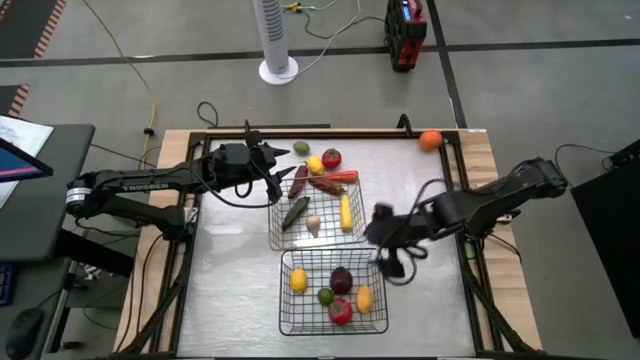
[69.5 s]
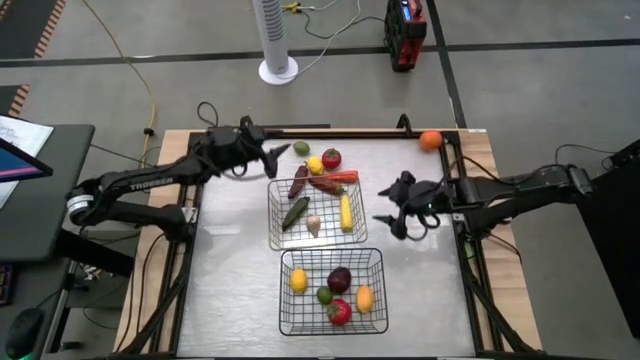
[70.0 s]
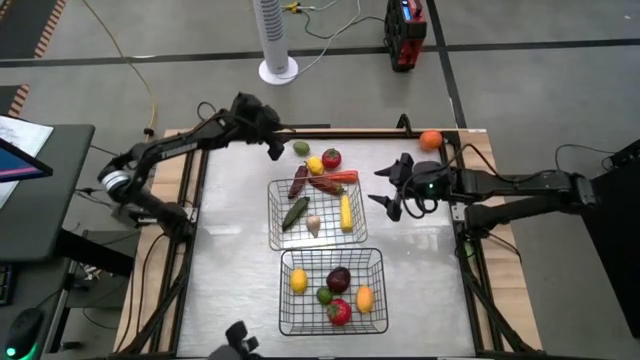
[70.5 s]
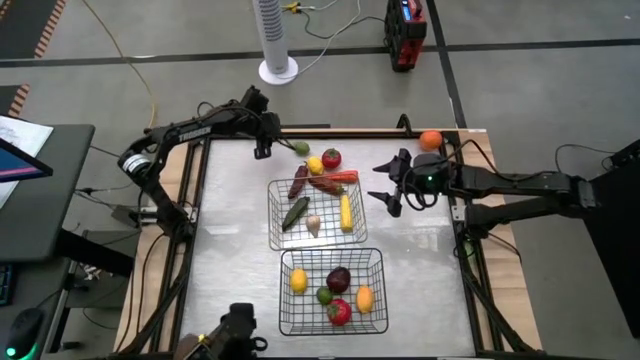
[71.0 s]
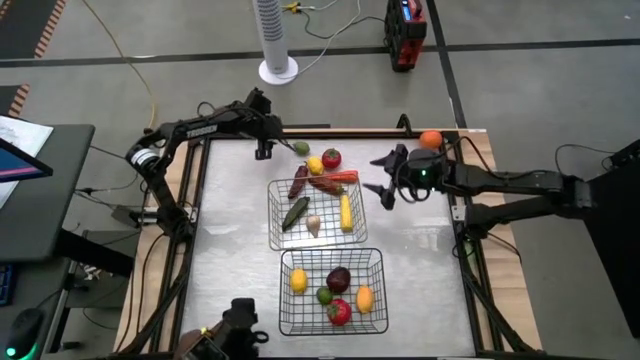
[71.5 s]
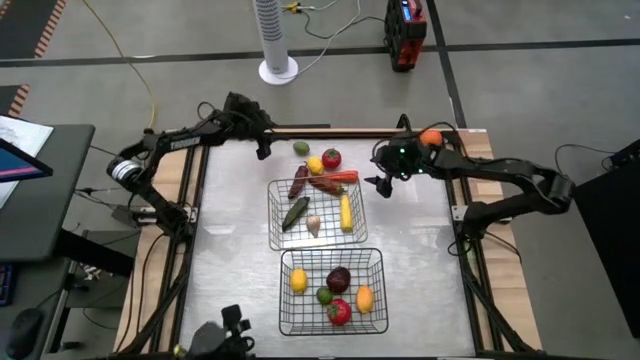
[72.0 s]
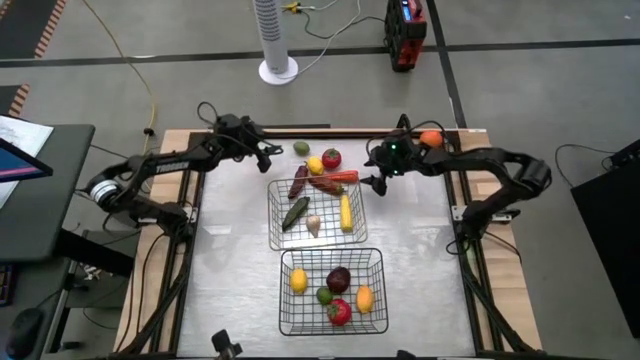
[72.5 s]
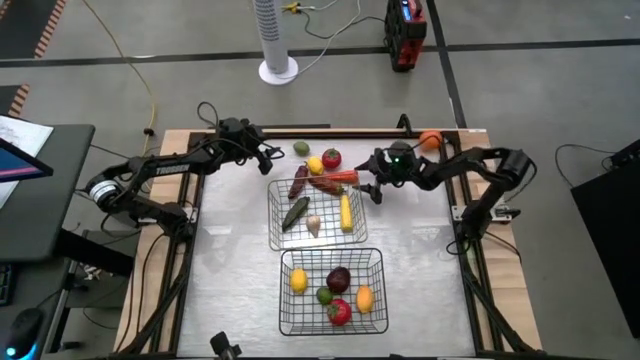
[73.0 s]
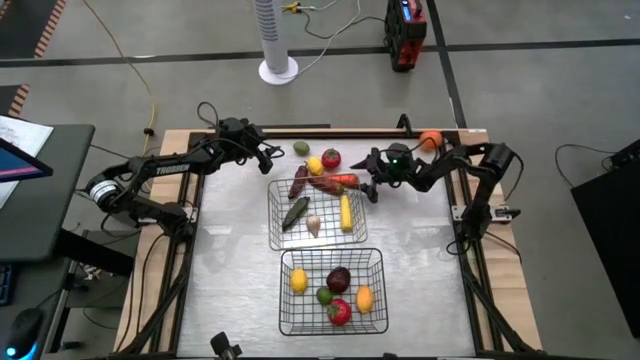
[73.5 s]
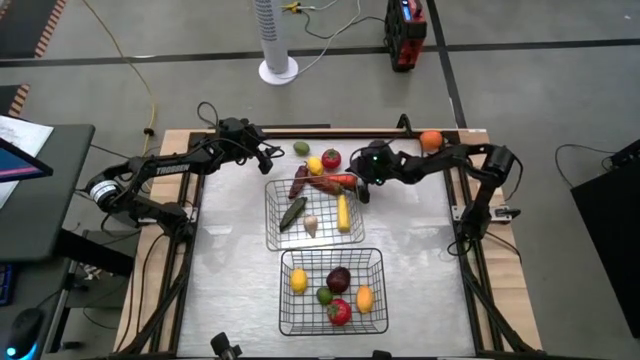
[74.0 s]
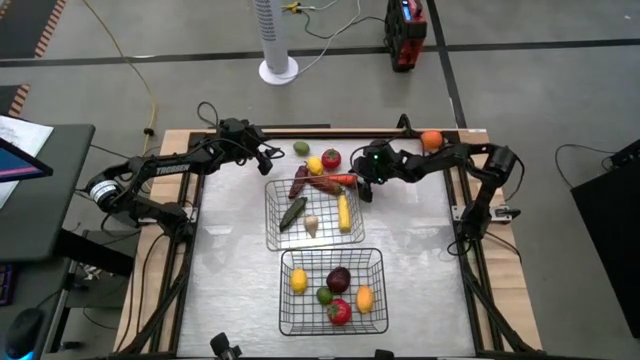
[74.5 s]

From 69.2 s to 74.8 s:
Task: Sort produce into baskets
Put the carrot into the top wire basket

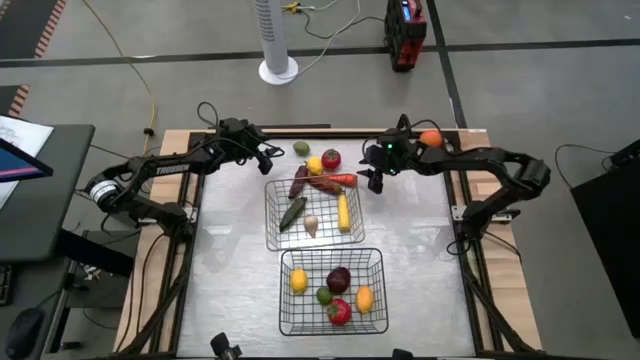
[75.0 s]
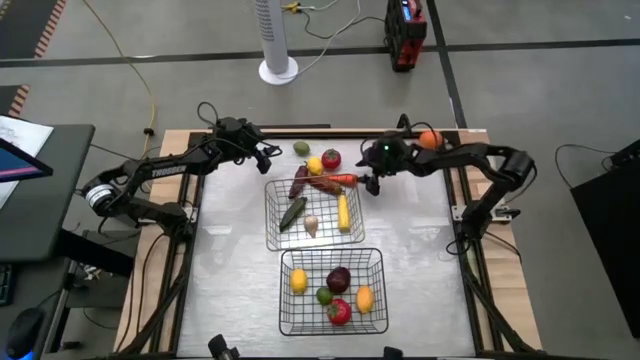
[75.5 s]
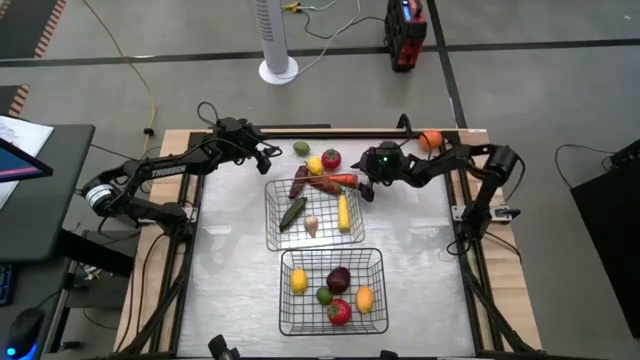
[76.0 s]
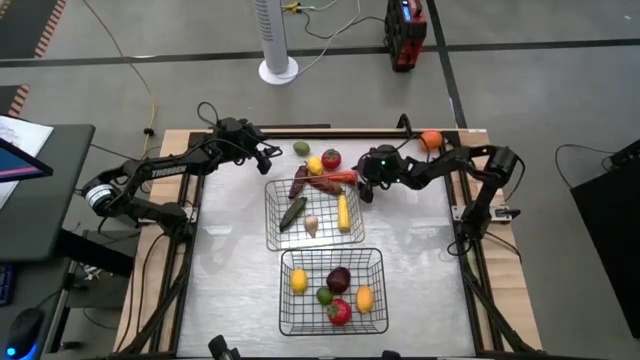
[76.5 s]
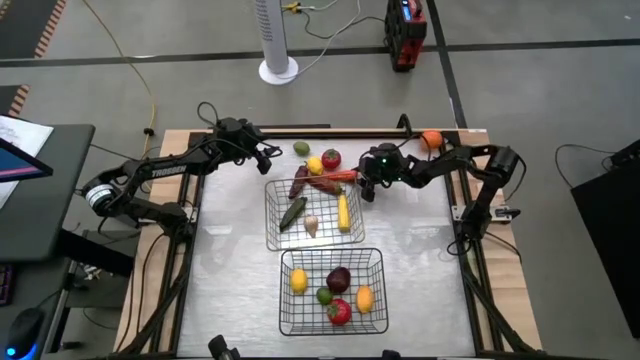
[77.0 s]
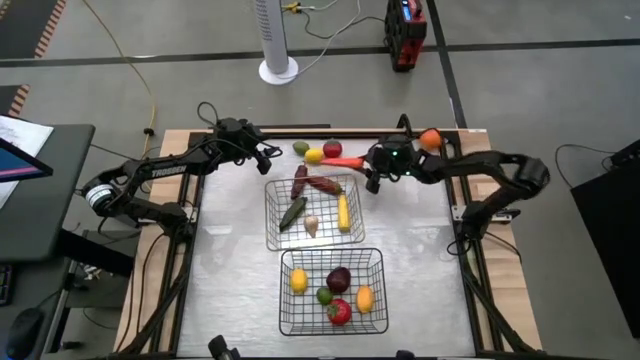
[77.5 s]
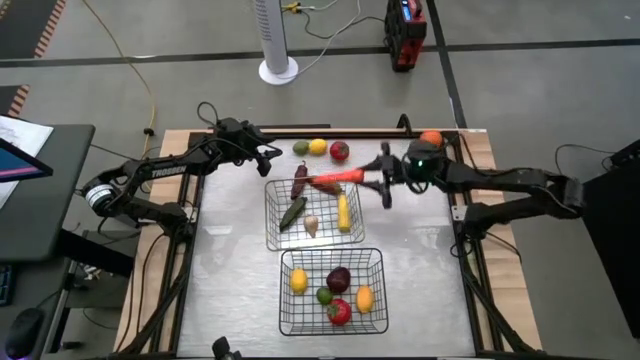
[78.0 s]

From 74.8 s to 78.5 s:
Put the carrot into the top wire basket

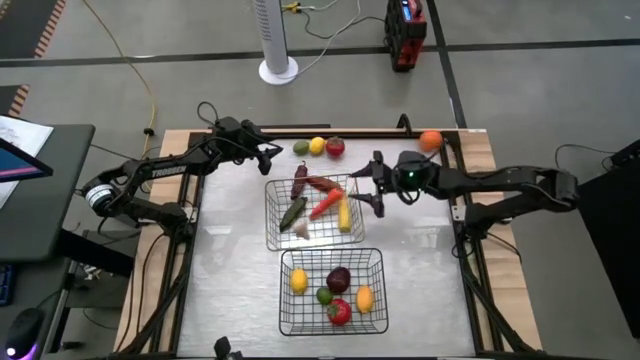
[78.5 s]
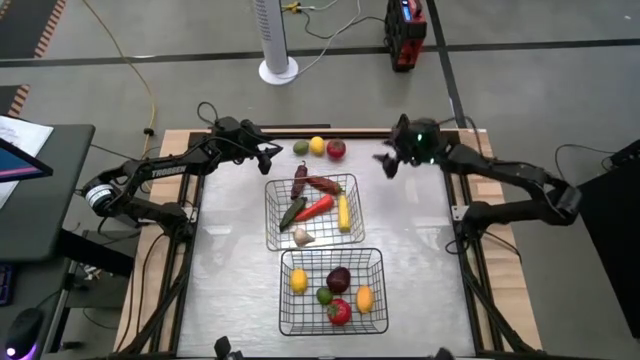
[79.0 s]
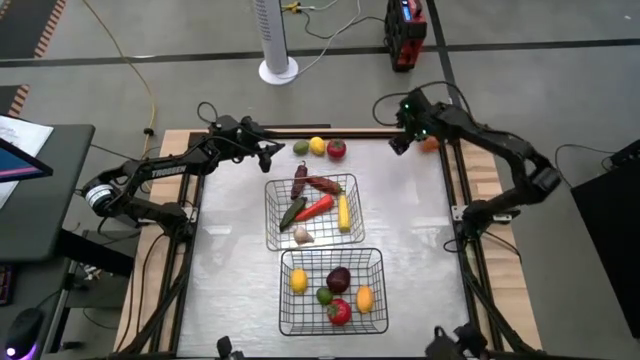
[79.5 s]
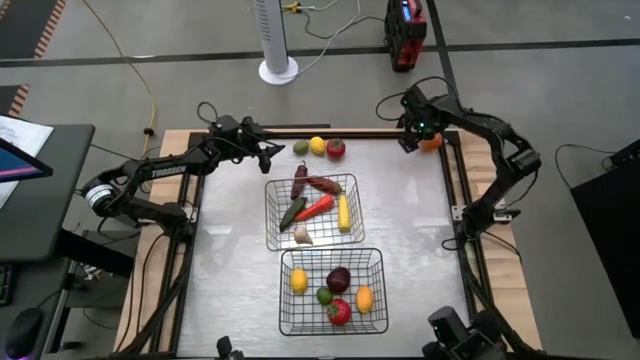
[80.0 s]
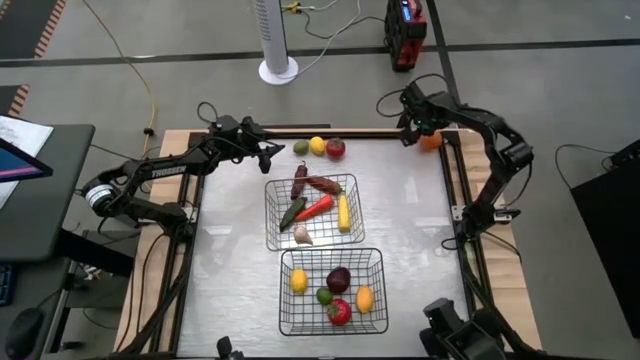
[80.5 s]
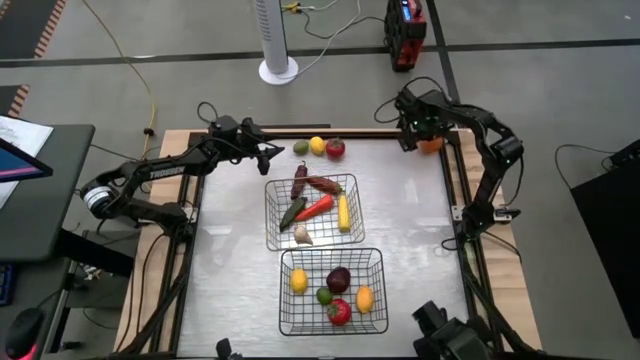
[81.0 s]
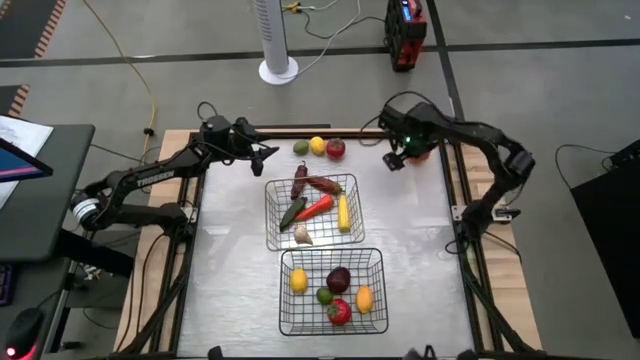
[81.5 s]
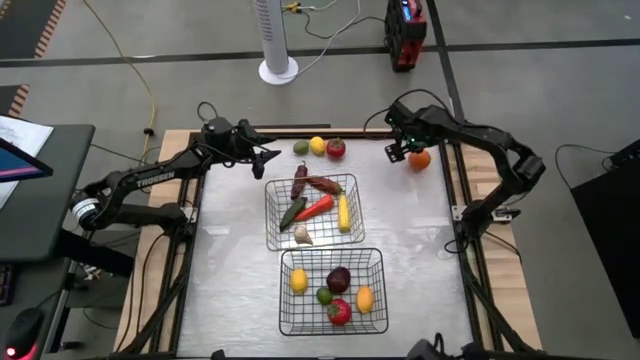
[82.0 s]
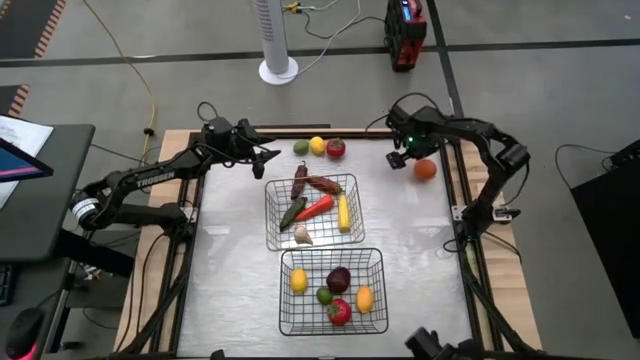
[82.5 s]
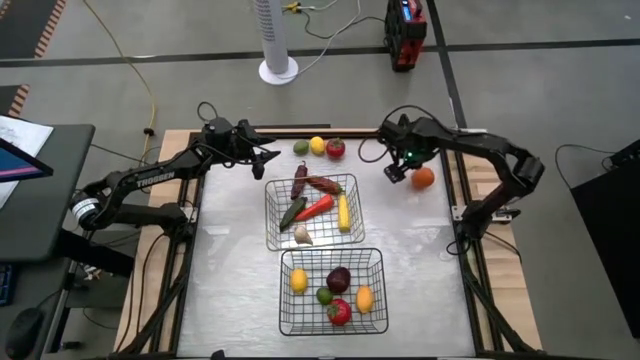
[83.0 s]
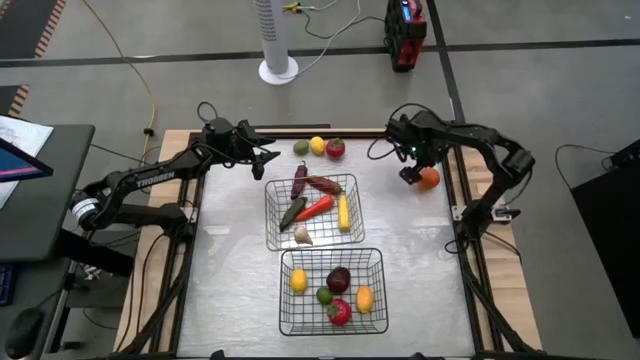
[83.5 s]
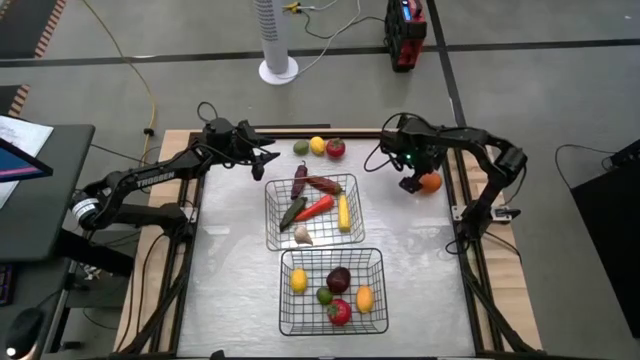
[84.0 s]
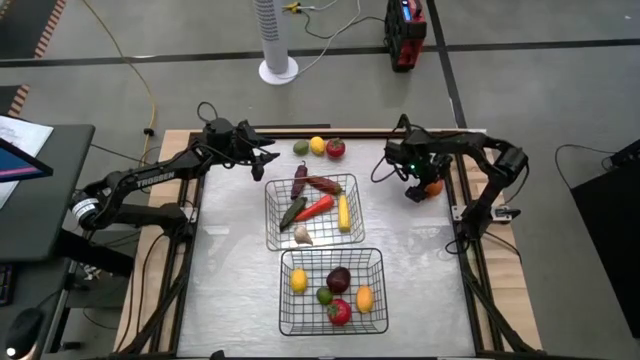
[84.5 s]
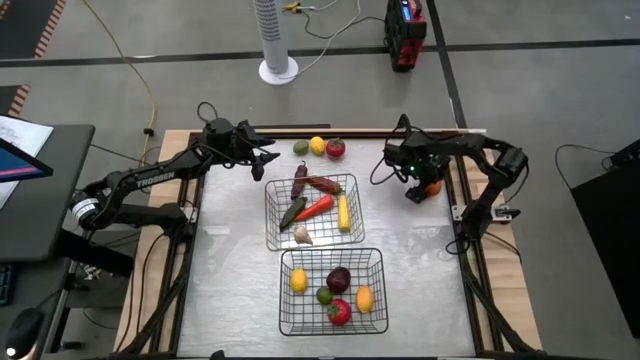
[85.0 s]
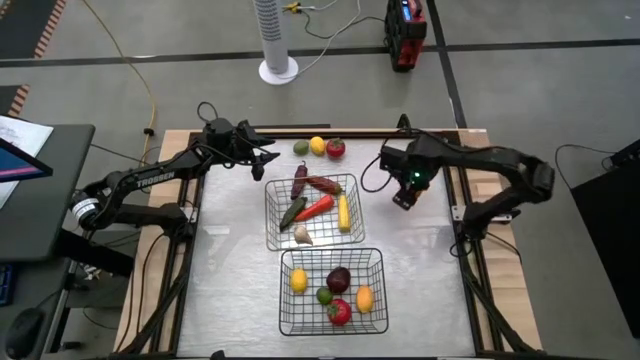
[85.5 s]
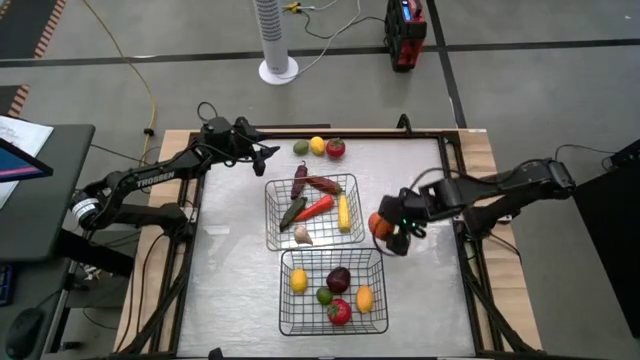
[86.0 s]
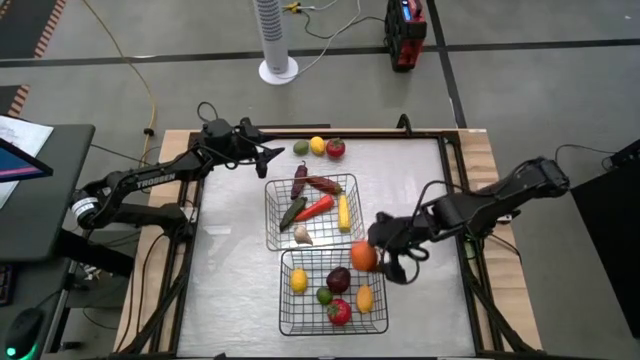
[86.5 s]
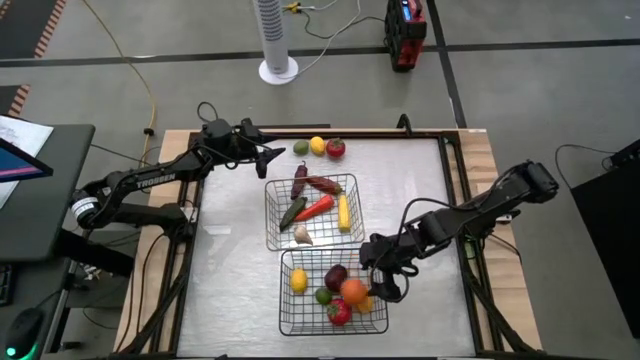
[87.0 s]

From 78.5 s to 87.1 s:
Put the orange into the bottom wire basket

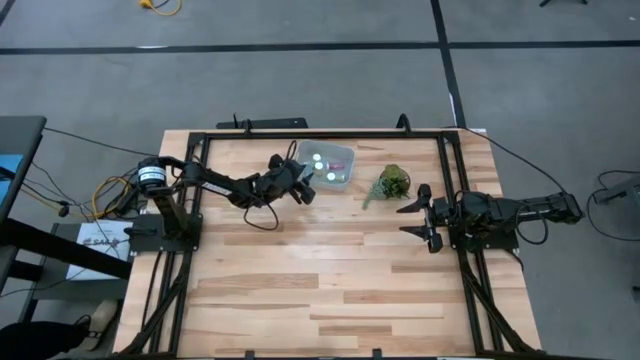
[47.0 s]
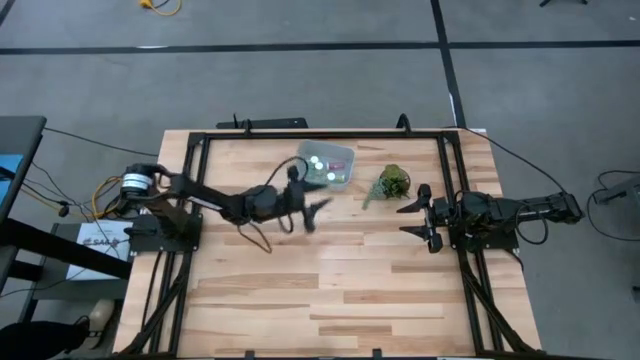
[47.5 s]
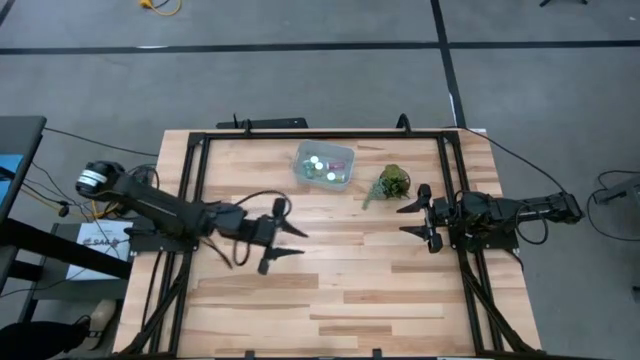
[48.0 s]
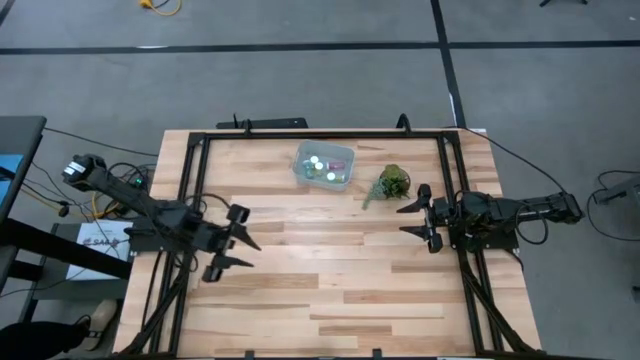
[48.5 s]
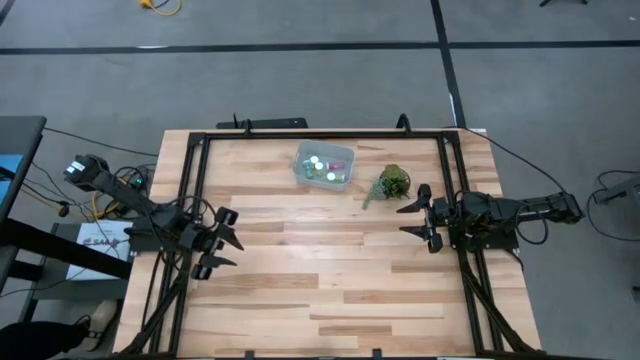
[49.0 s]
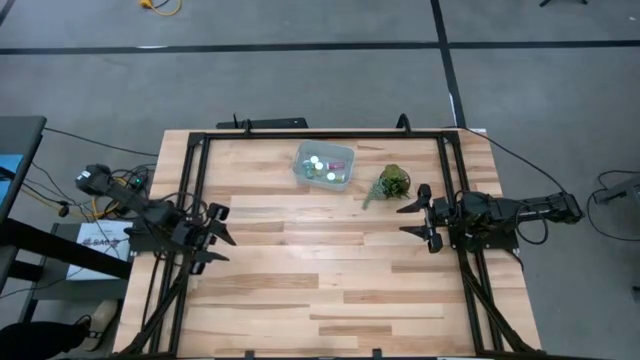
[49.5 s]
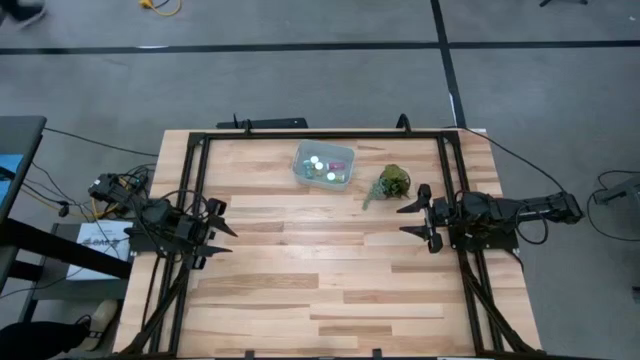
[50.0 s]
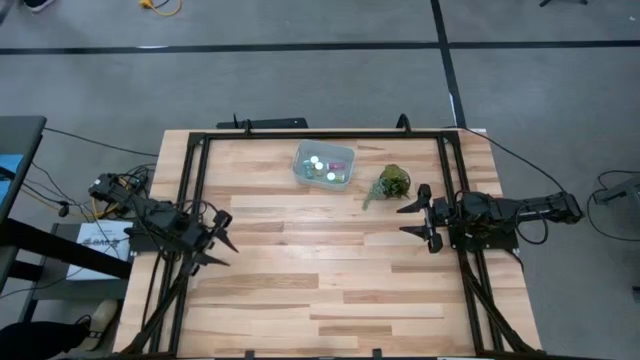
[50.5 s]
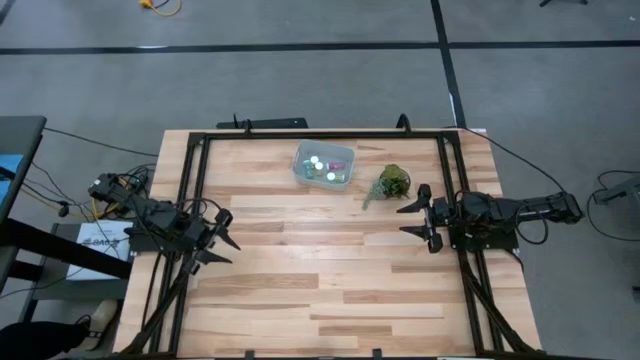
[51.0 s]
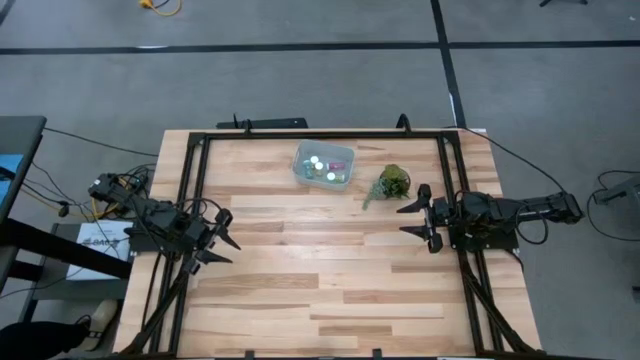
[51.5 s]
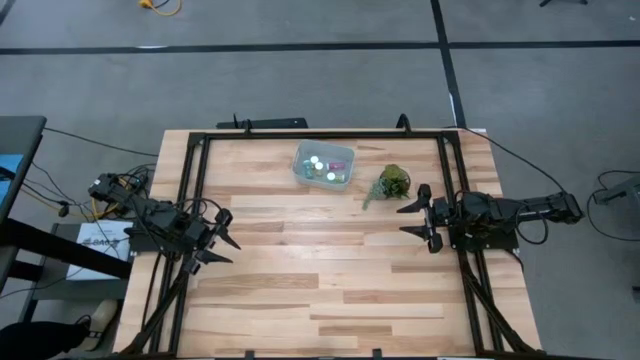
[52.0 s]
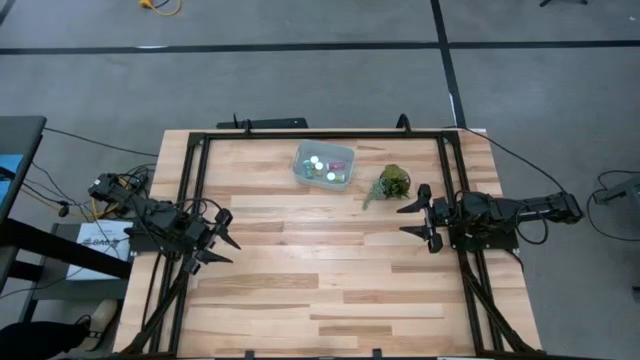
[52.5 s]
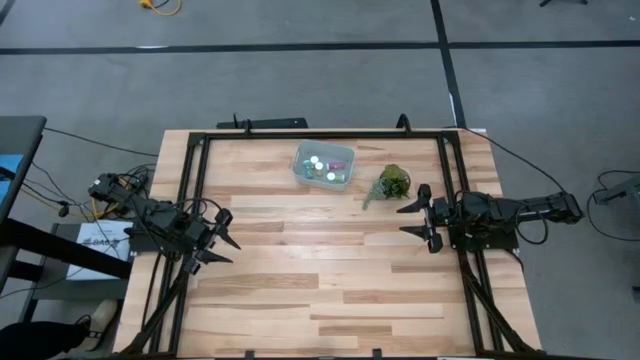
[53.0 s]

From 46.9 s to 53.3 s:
Task: Pick and place pill bottles into a basket
Return to Home Position
